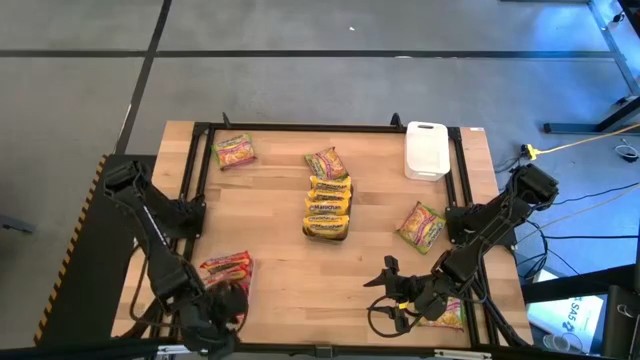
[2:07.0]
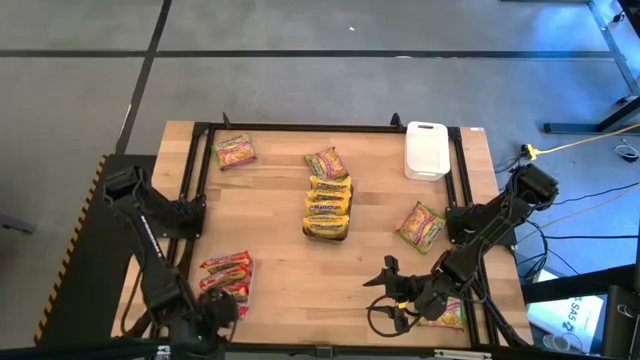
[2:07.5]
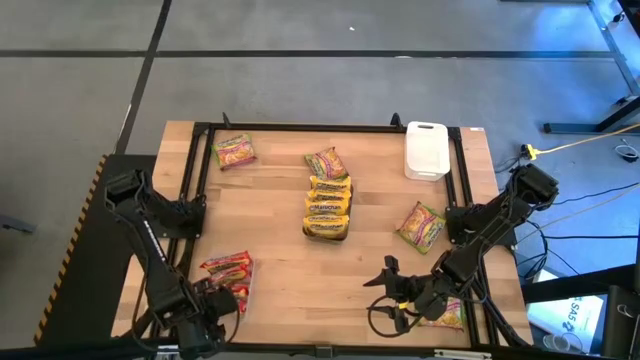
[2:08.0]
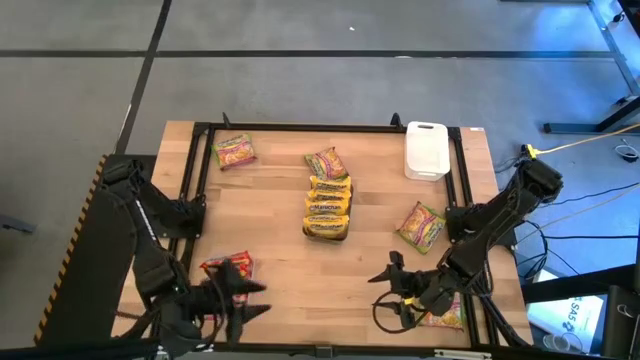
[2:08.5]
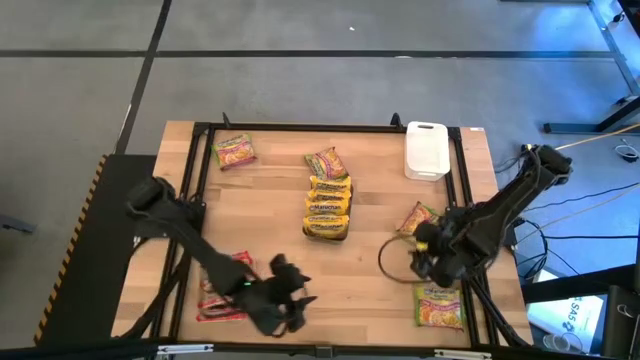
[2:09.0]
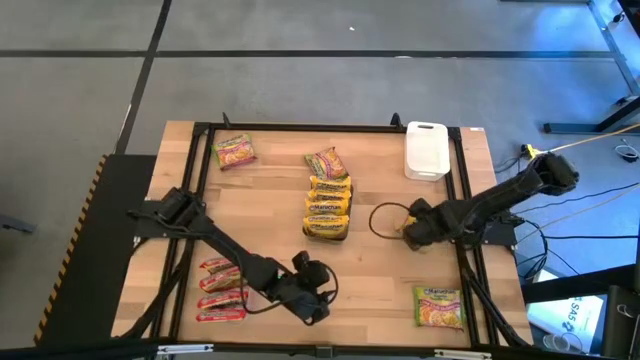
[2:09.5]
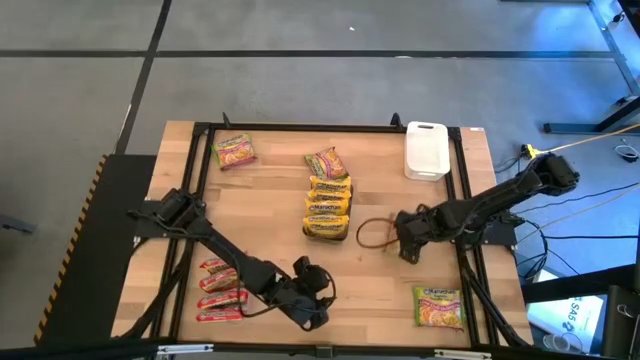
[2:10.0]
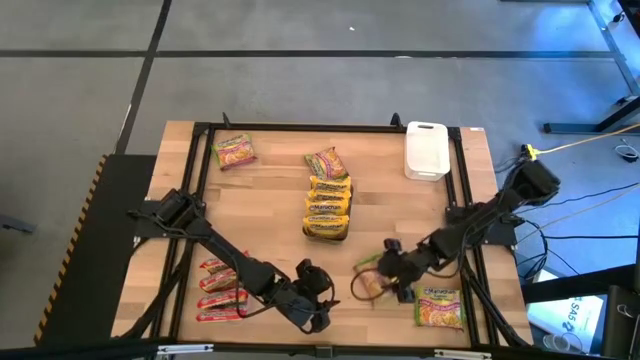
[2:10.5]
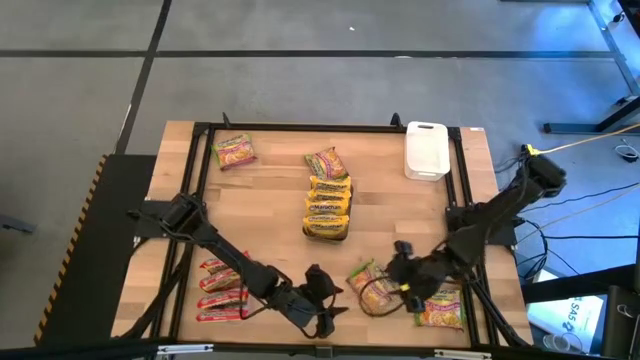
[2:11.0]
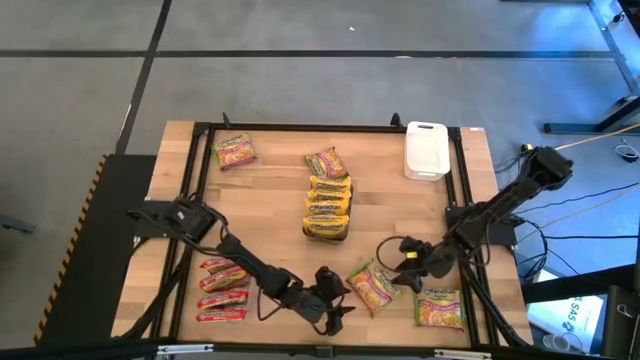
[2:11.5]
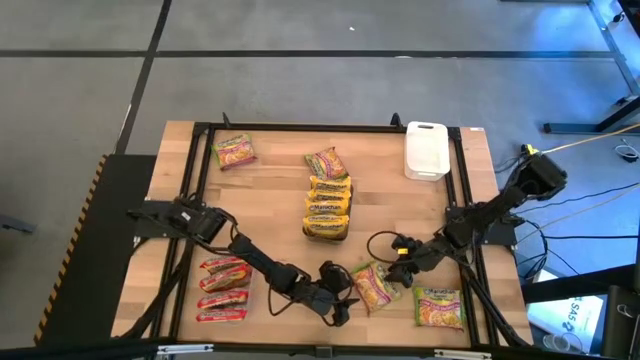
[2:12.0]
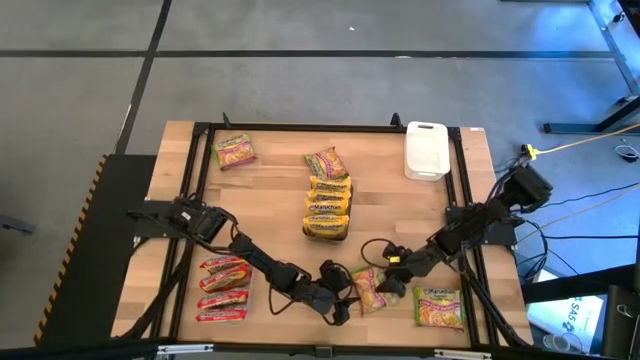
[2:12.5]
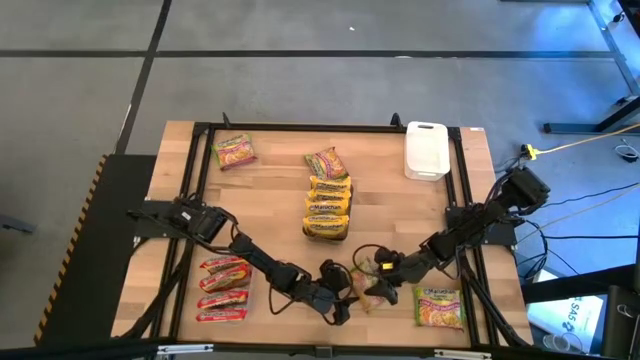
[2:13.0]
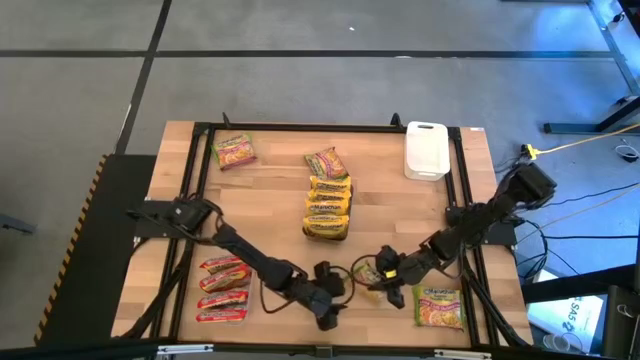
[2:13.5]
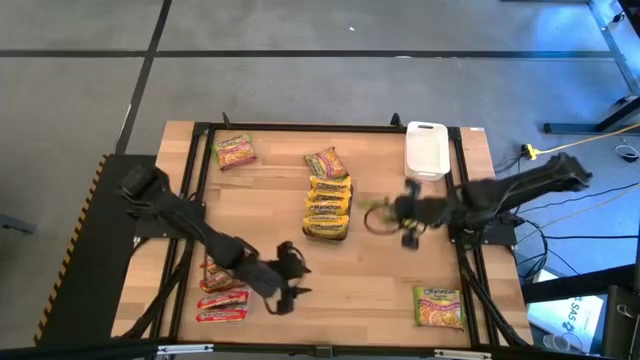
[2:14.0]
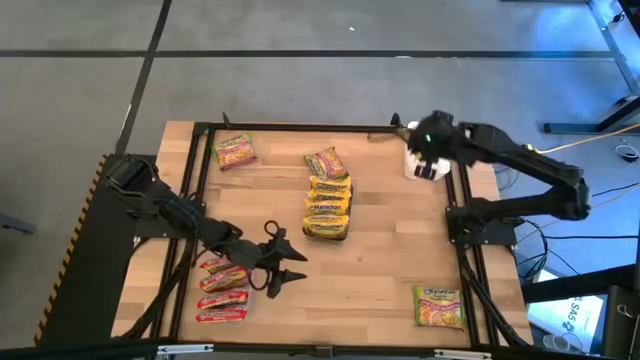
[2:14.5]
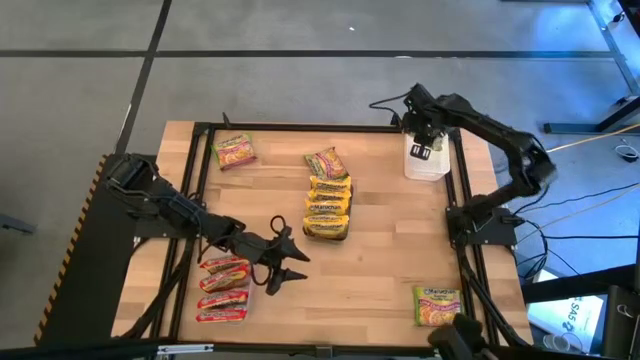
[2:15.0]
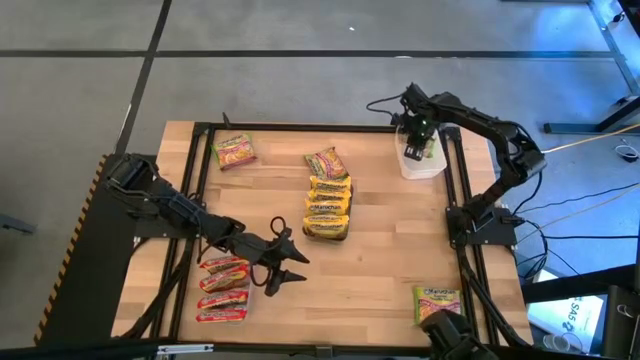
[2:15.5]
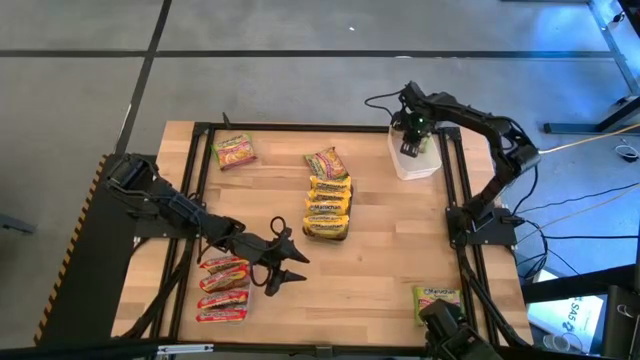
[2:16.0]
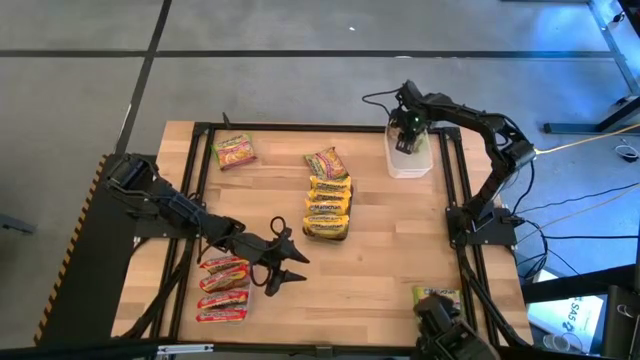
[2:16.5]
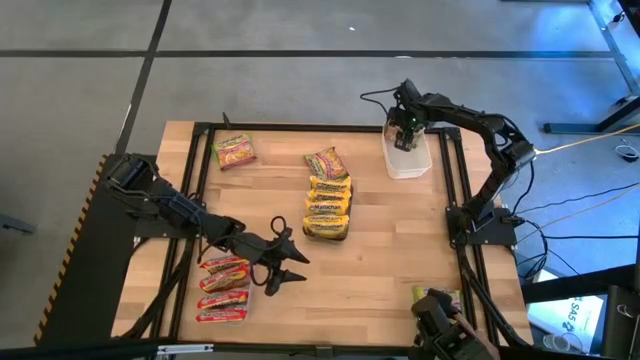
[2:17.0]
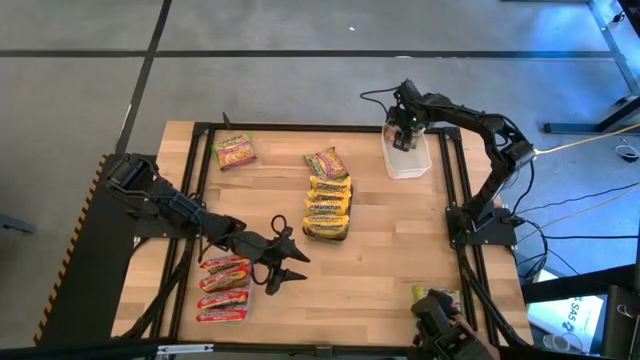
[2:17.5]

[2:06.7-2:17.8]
Task: Sort Maruchan noodles
Put the green noodle pack into the white bin

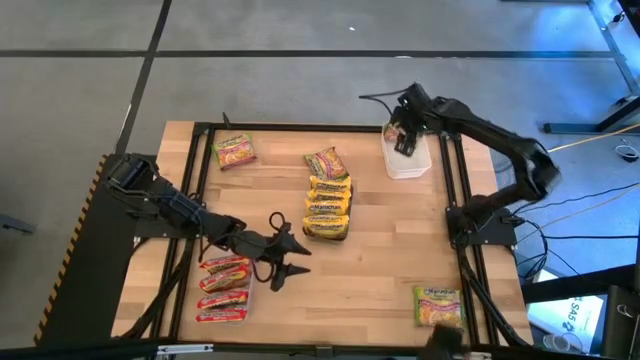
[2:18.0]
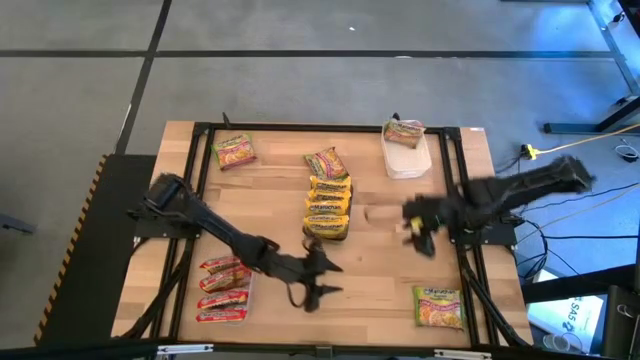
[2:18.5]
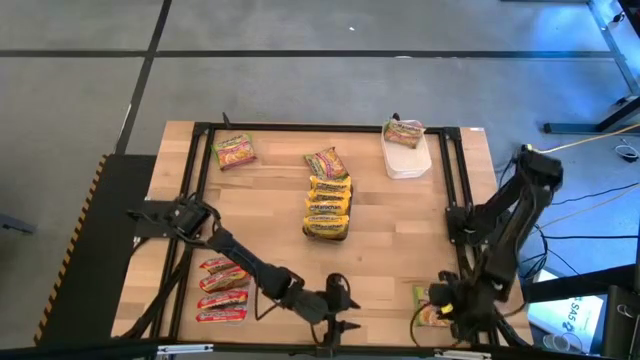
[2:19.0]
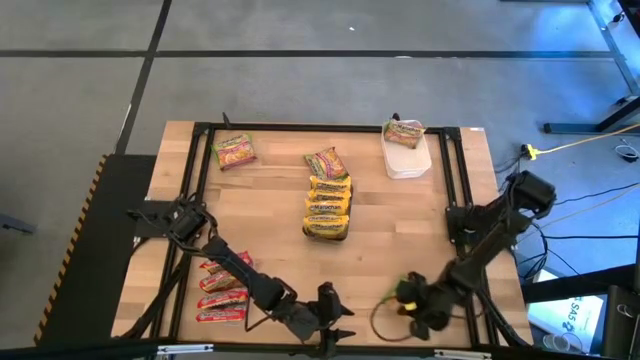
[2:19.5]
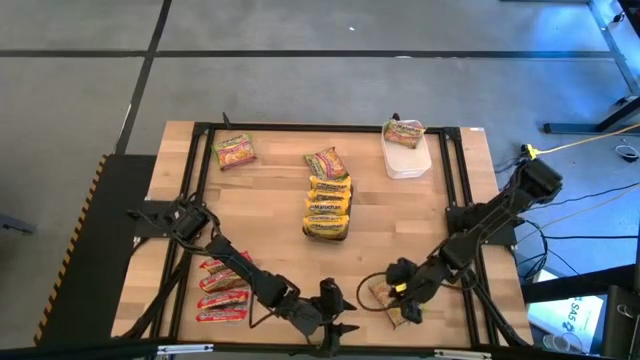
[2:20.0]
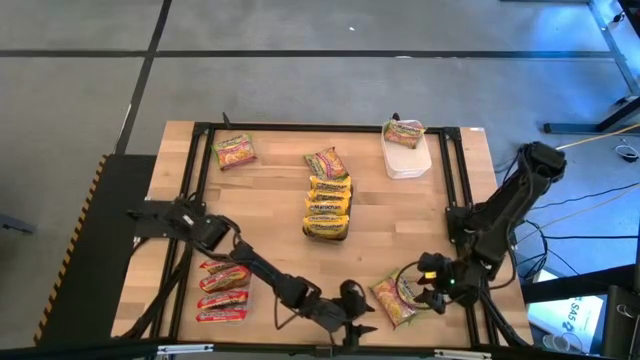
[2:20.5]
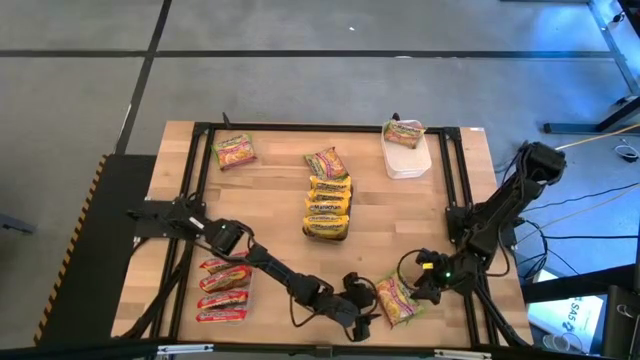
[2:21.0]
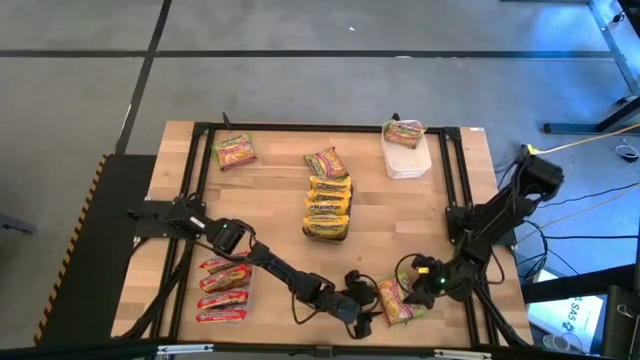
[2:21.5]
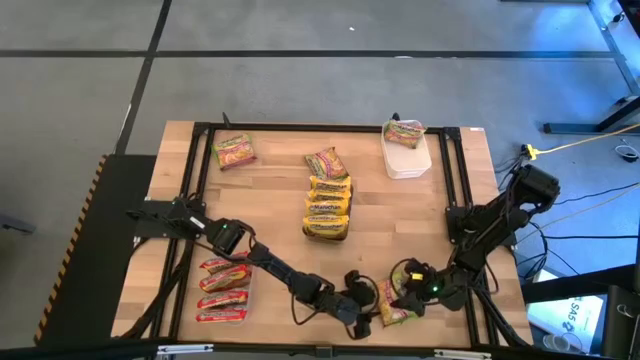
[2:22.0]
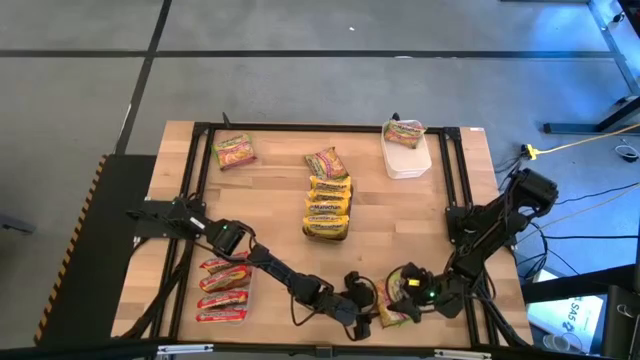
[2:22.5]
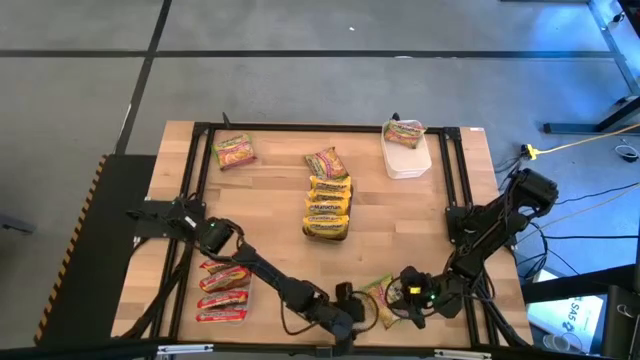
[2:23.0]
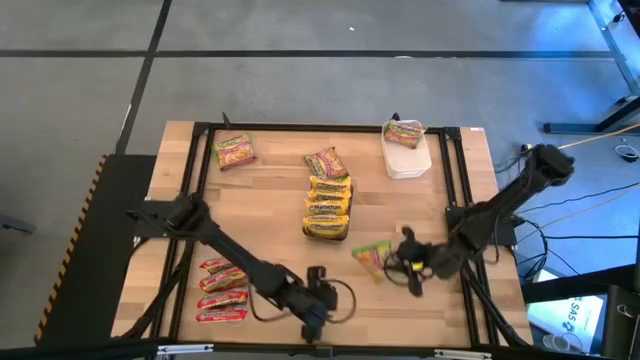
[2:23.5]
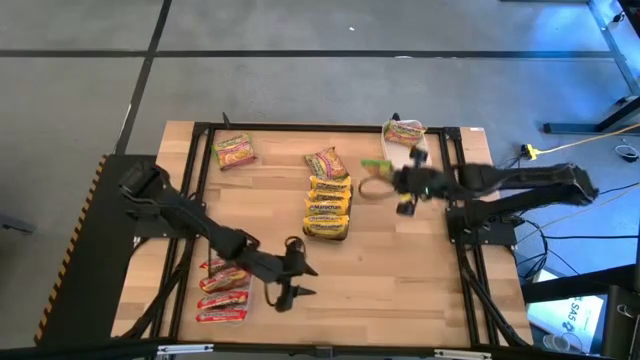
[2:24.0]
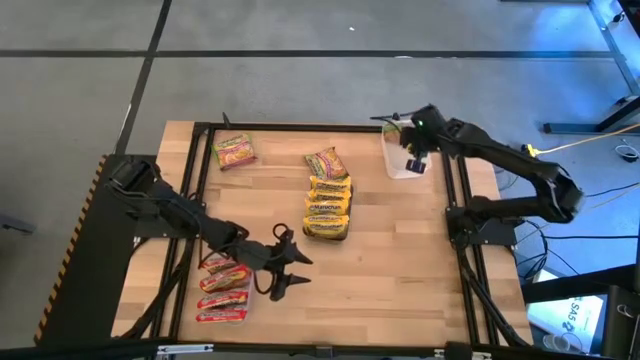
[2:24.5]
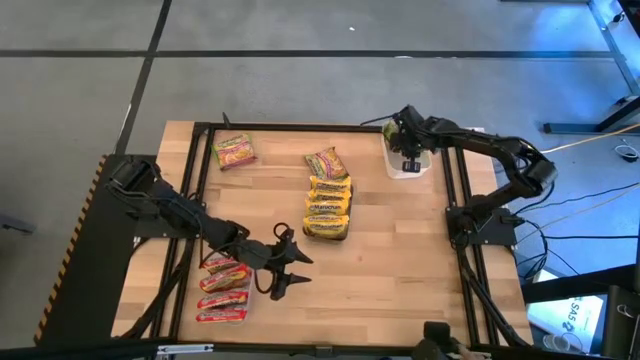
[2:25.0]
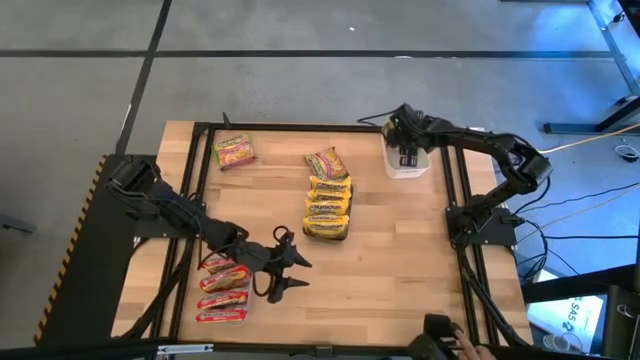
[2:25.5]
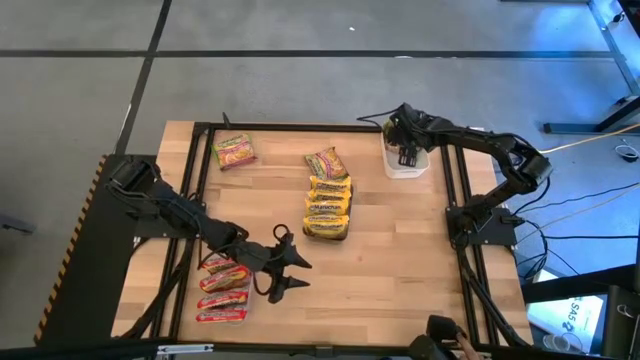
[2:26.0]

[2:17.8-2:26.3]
Put the green noodle pack into the white bin

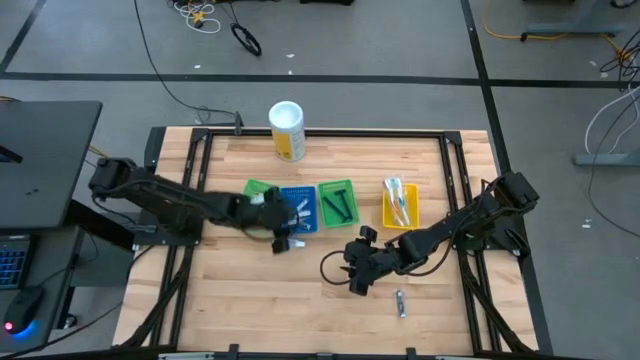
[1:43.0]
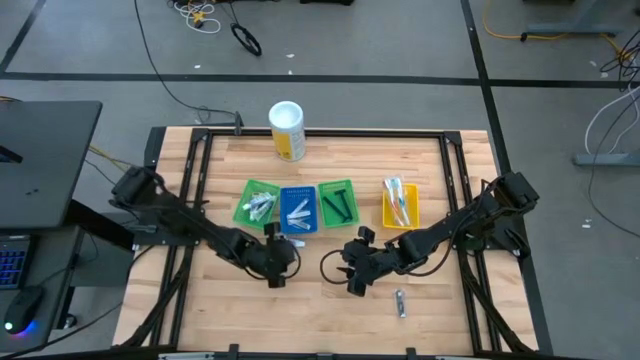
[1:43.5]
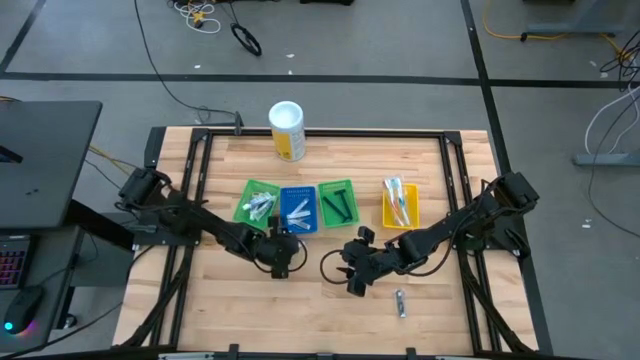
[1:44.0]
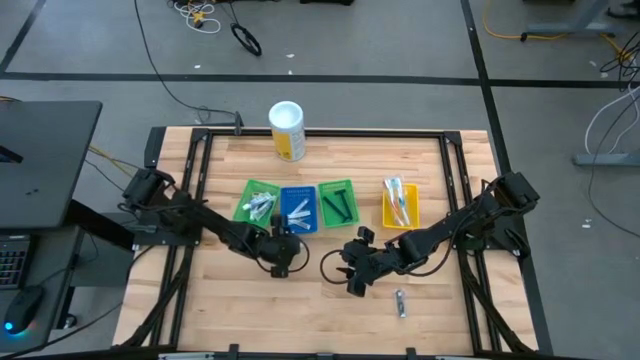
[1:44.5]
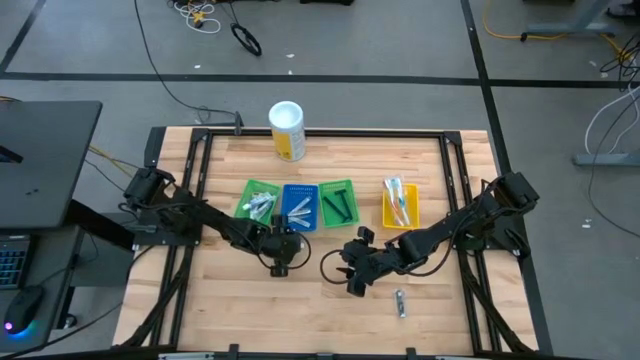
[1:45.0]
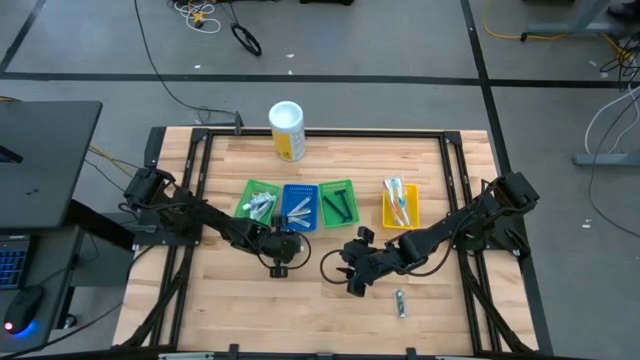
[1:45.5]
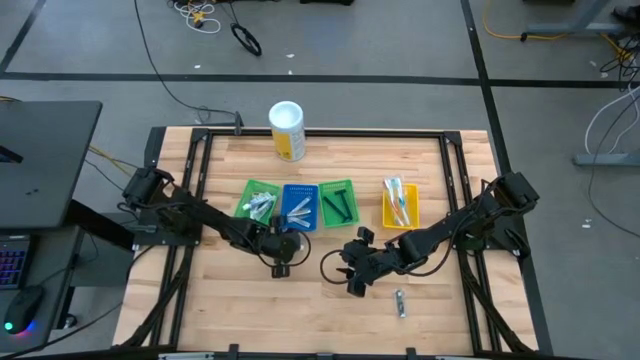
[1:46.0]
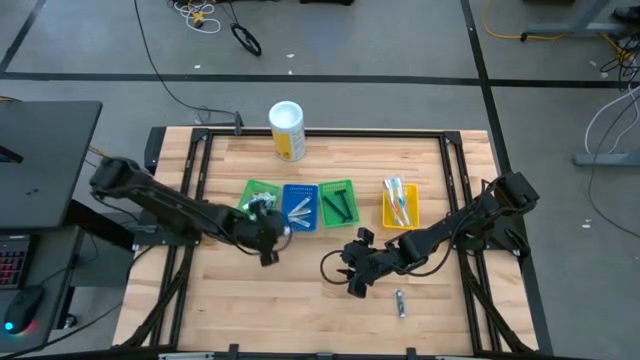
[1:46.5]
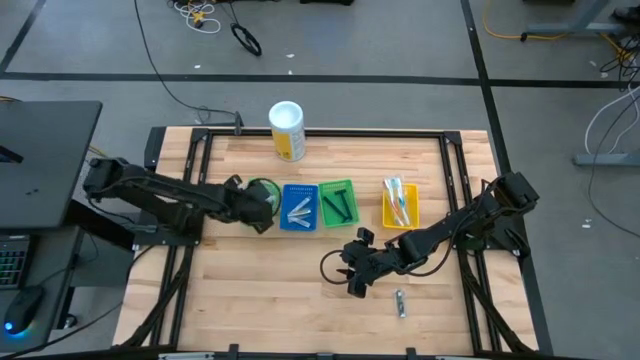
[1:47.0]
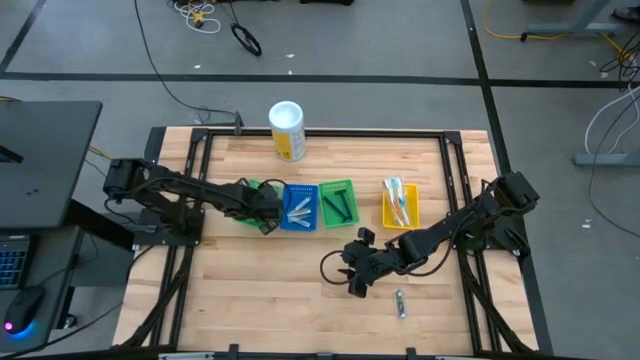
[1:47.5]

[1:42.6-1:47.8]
Task: Pick & Place Travel size toiletries
Put the purple and white toothpaste into the left green bin
